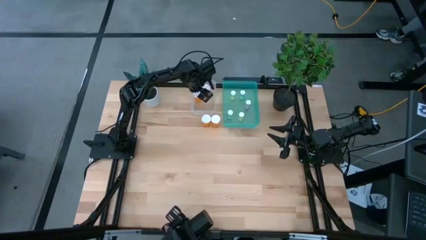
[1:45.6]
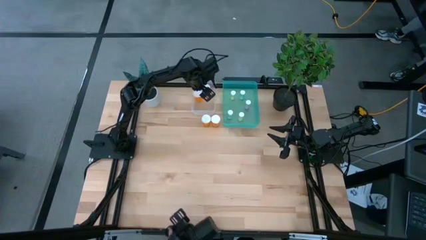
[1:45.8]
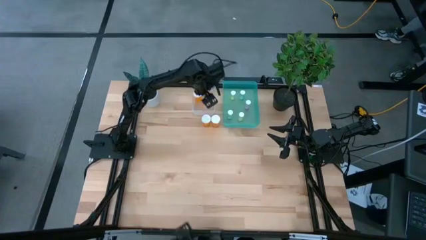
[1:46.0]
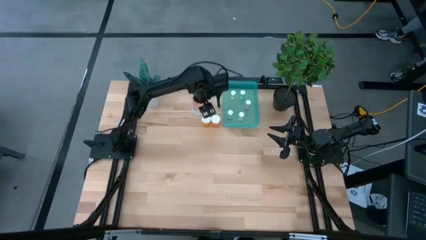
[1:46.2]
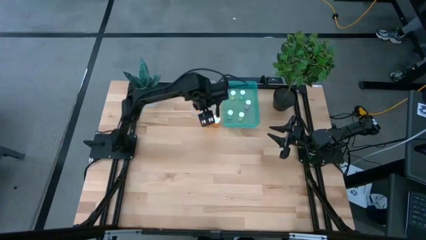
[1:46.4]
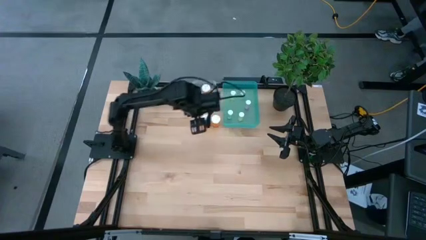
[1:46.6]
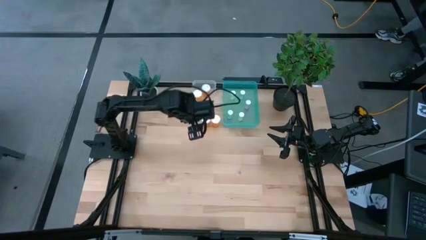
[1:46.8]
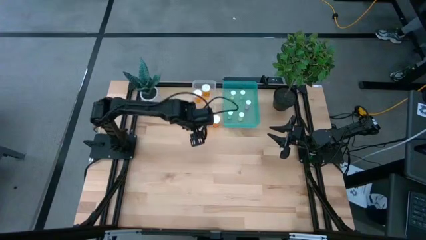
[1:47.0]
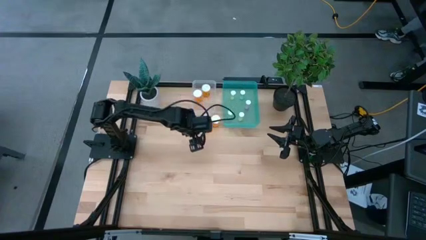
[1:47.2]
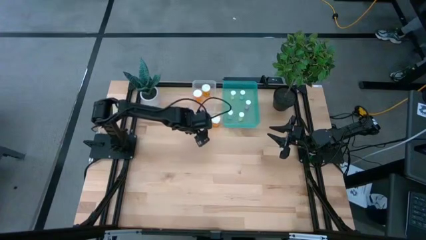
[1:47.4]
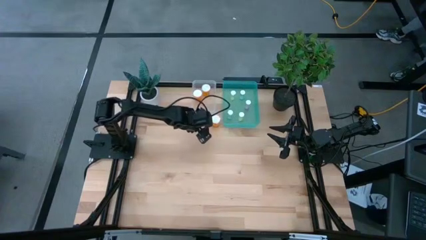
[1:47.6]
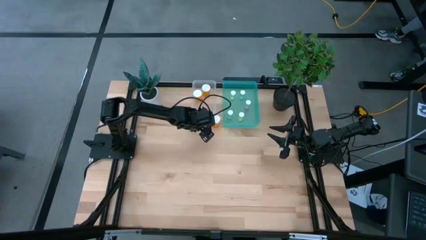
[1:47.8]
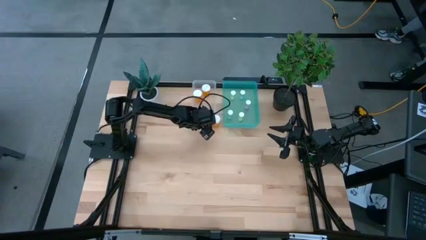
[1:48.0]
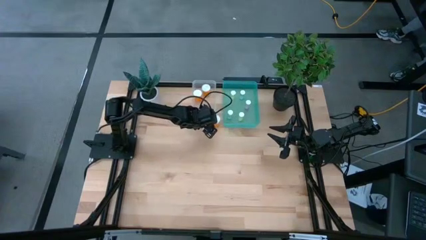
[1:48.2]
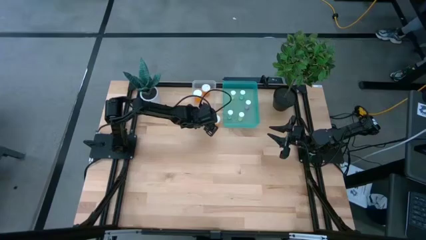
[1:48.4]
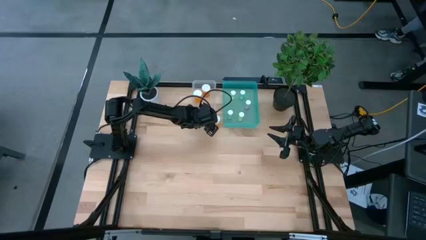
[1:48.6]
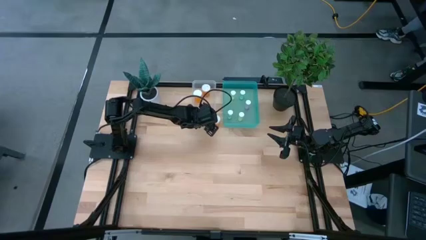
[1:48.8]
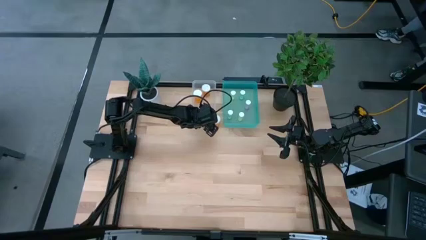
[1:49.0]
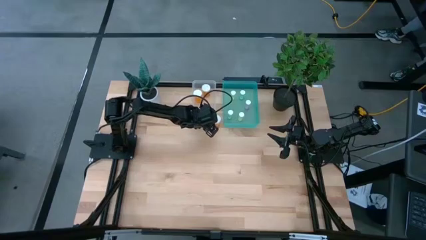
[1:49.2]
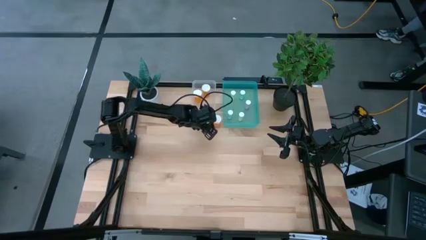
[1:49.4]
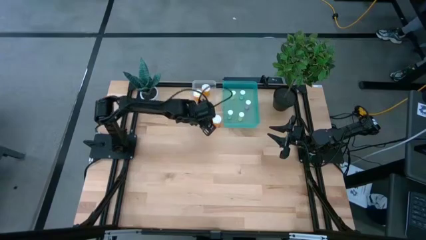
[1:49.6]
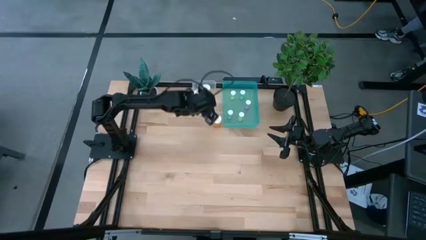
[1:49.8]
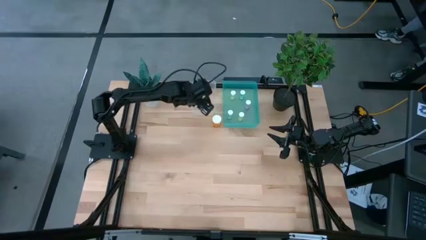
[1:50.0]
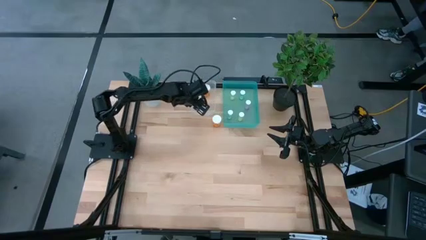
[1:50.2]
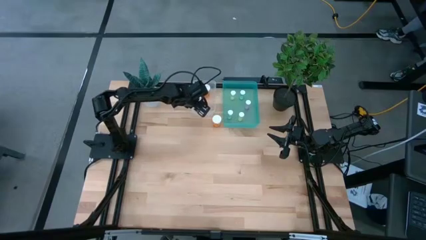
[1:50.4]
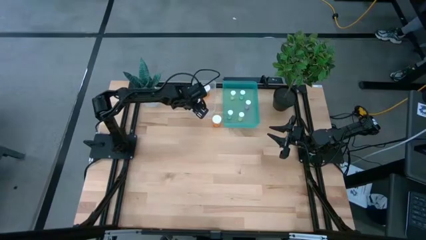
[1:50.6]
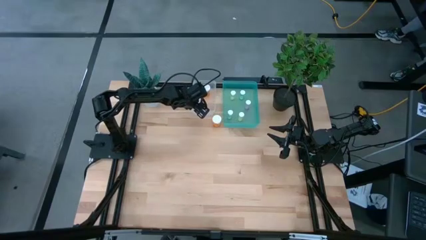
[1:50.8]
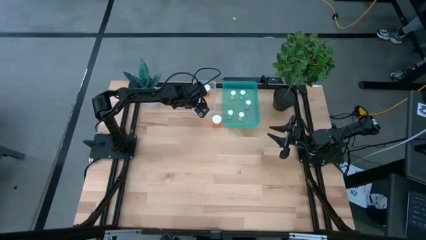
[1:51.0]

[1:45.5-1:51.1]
Task: Pick and place medicine bottles into bin by pill shape (circle, oval)
Put the orange capsule bottle into the transparent bin
